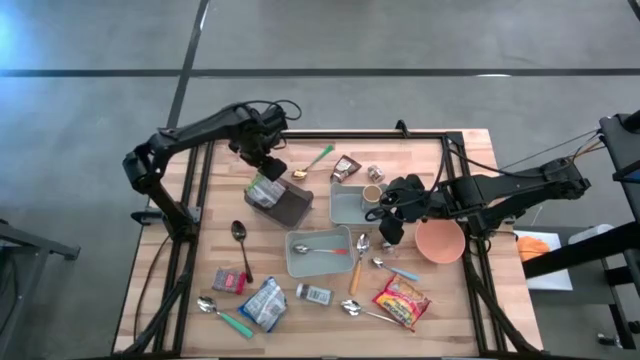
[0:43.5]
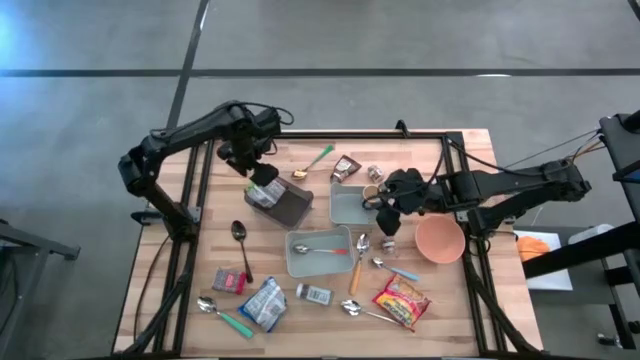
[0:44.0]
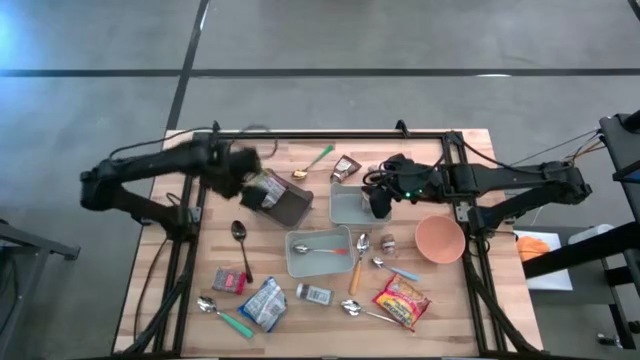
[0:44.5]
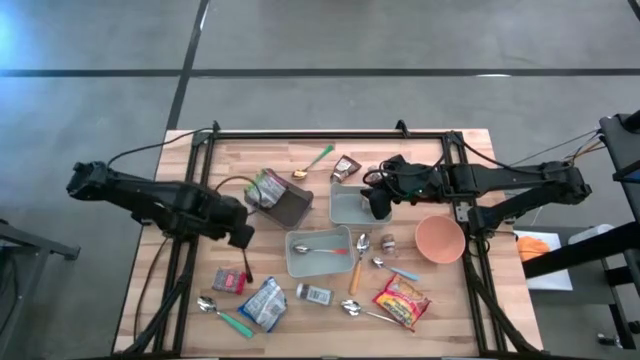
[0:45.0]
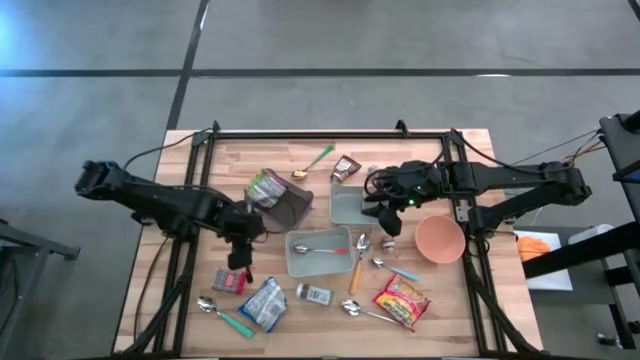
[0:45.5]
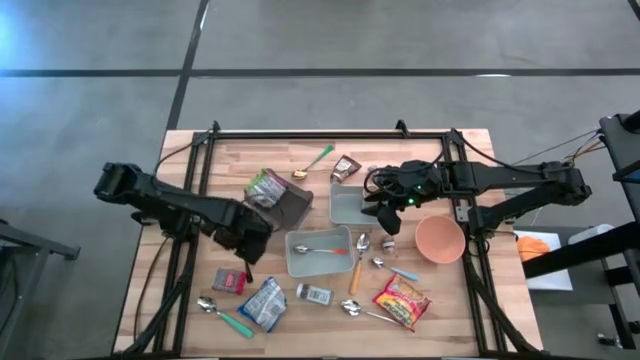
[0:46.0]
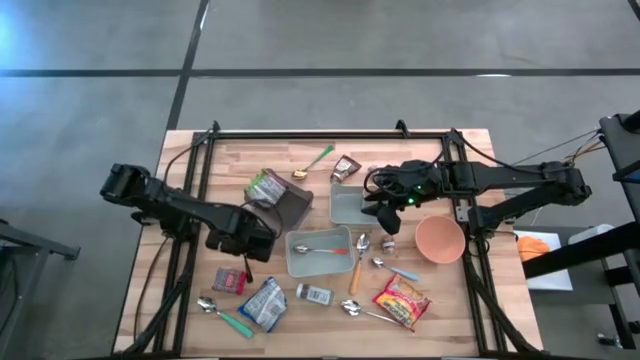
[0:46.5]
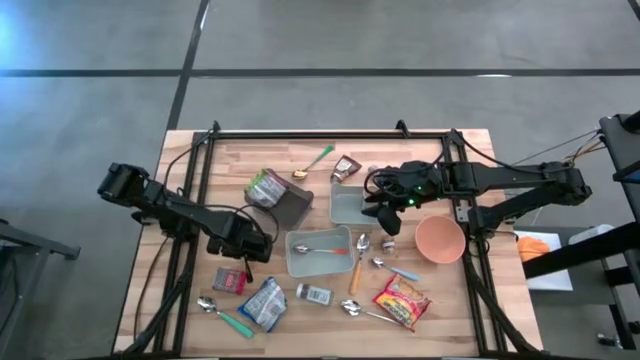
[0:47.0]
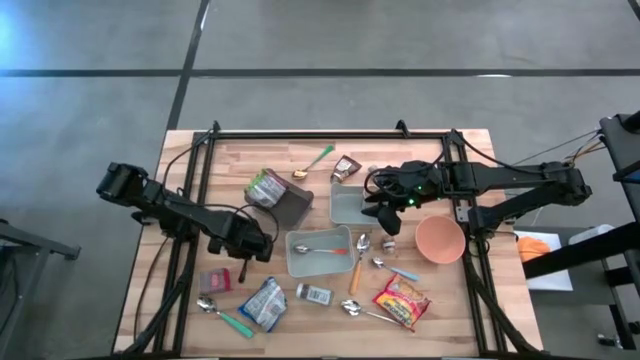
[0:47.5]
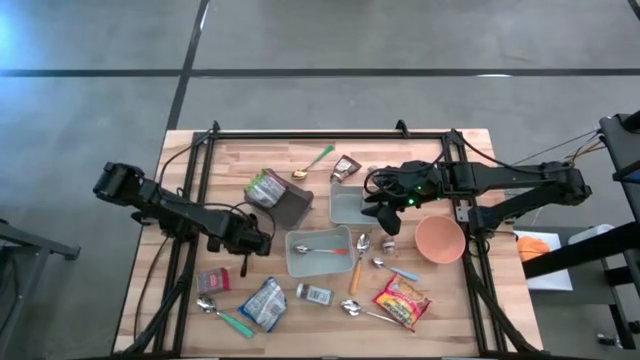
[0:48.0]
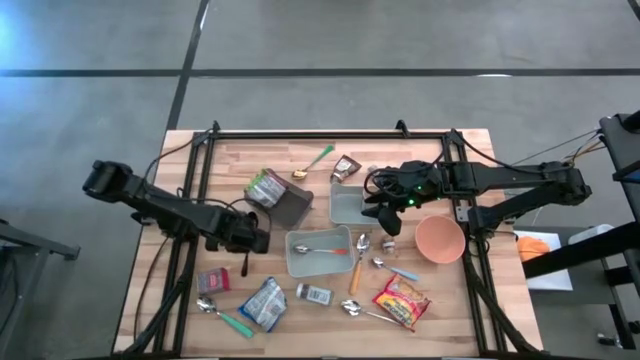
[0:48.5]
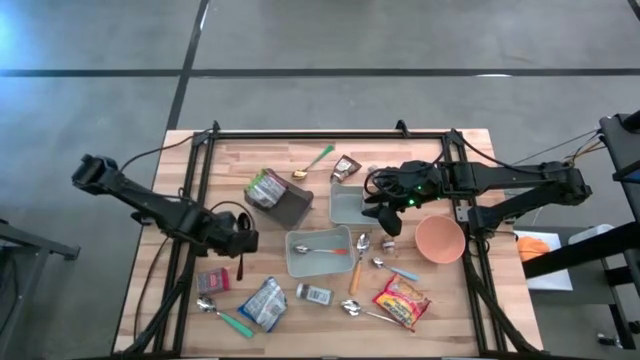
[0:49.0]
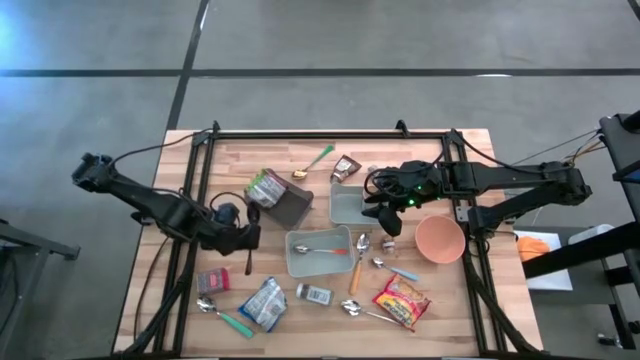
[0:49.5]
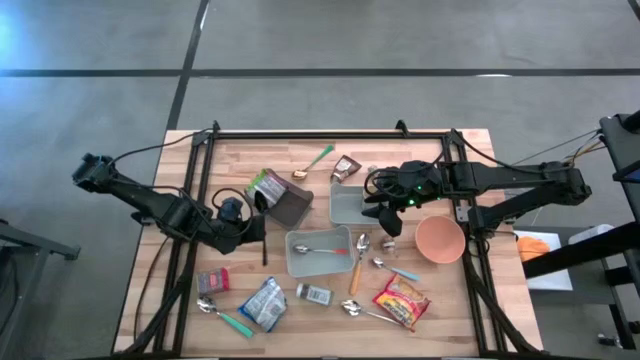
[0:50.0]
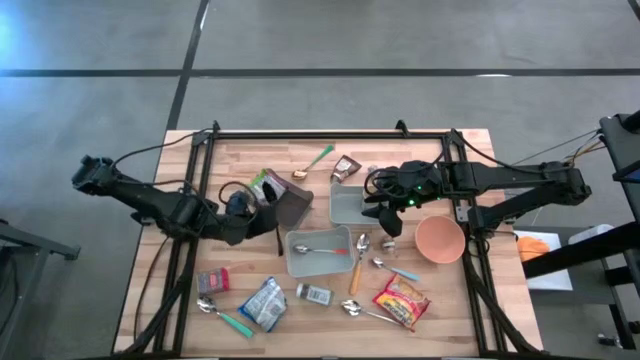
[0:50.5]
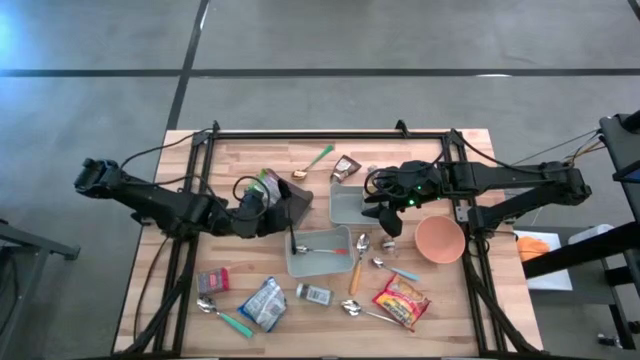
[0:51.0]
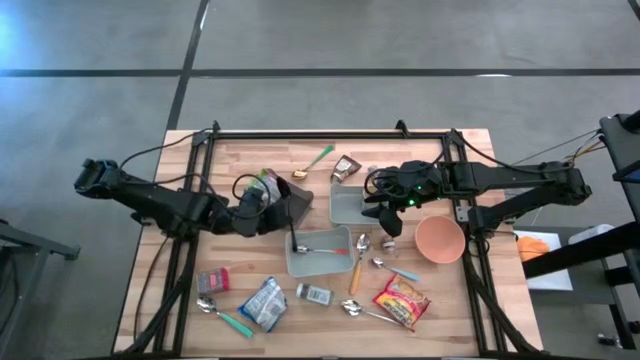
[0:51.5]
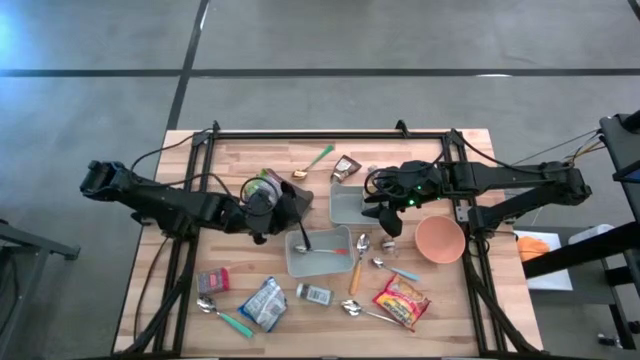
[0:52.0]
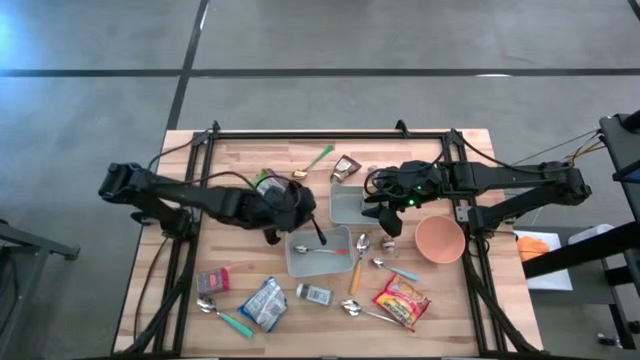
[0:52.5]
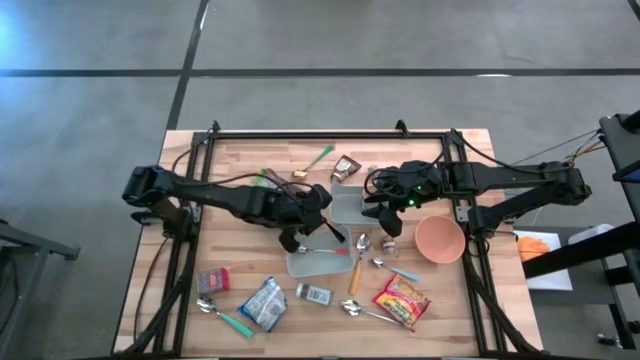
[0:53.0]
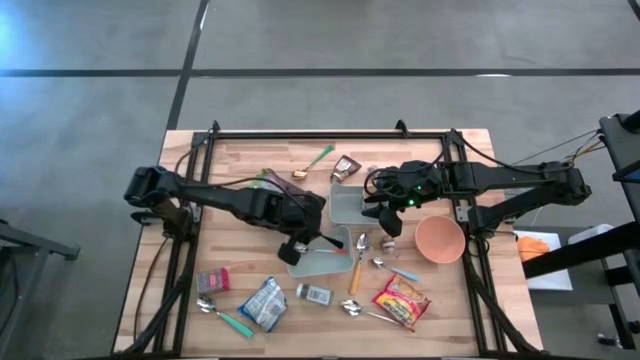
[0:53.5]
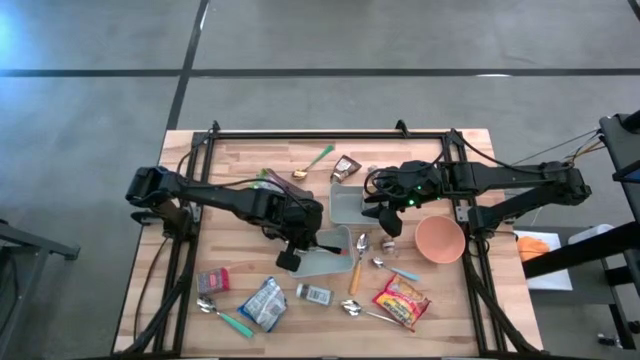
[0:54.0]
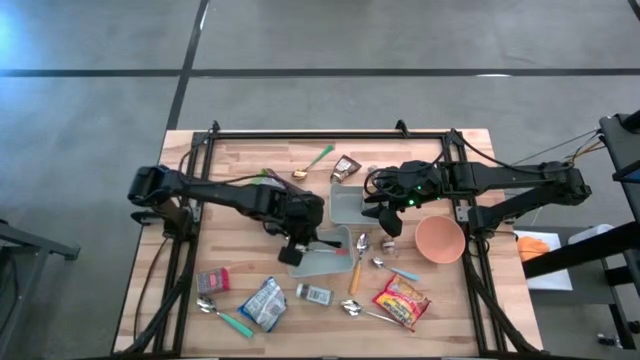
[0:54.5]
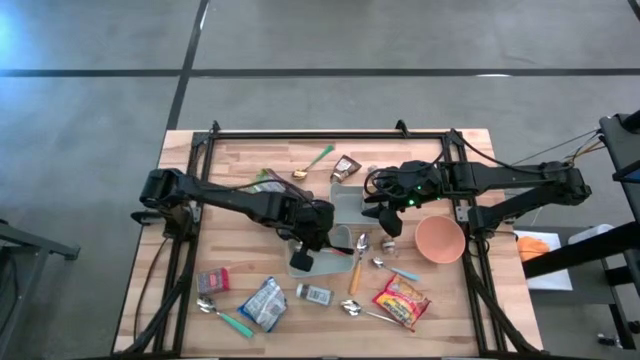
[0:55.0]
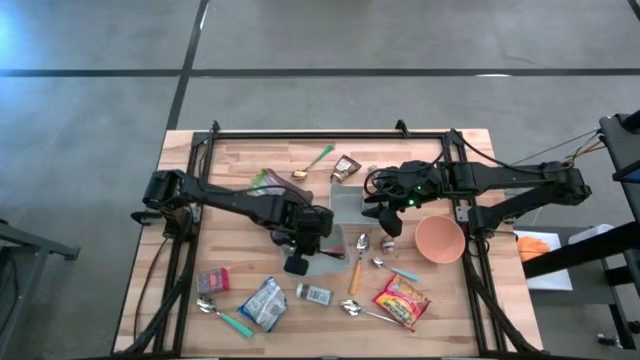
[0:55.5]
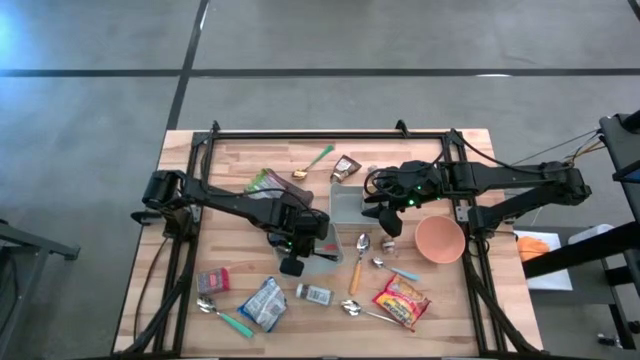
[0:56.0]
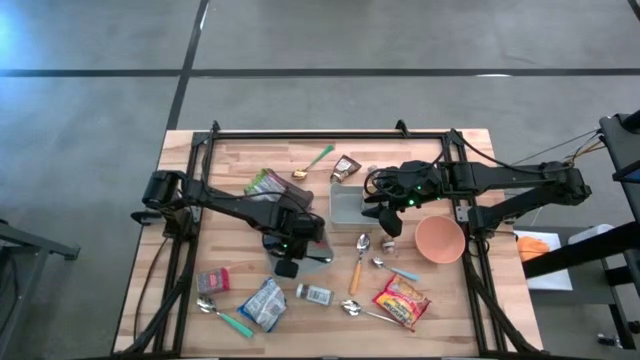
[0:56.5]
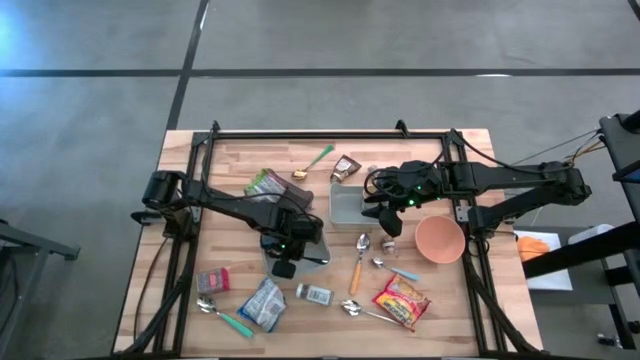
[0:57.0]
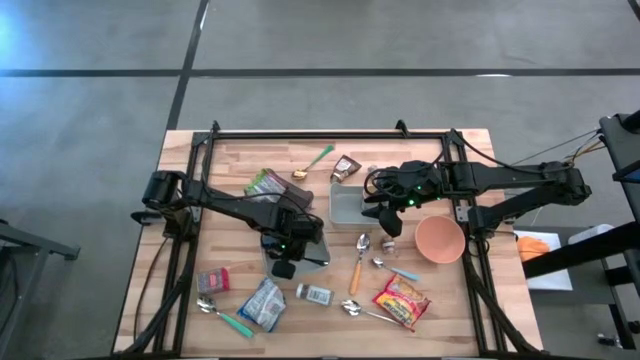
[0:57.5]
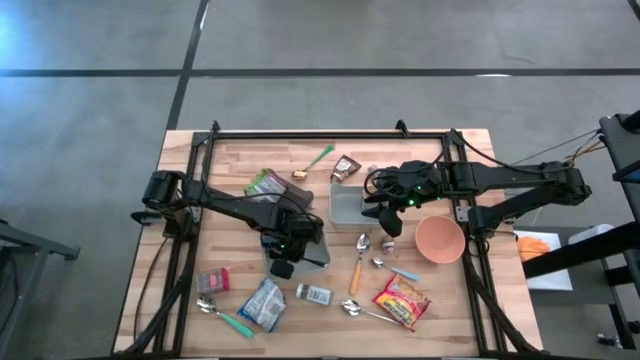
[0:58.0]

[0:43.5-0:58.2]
Put the black spoon into the bottom gray bin

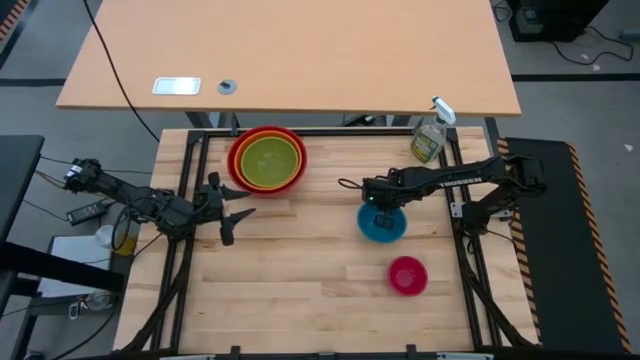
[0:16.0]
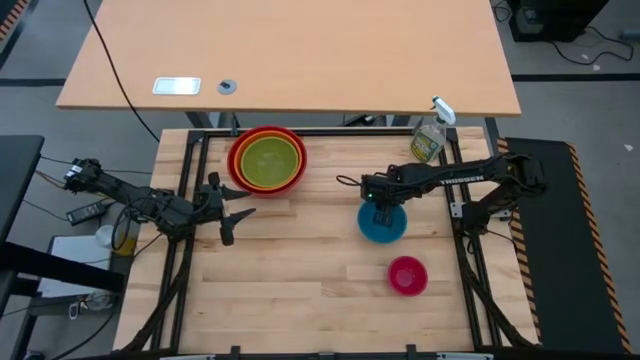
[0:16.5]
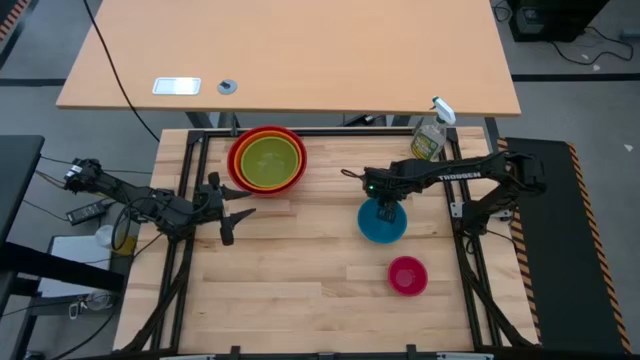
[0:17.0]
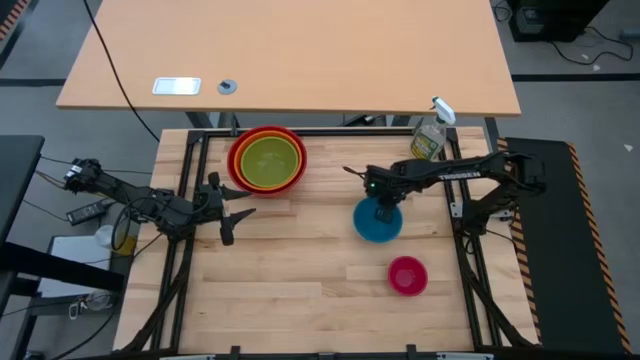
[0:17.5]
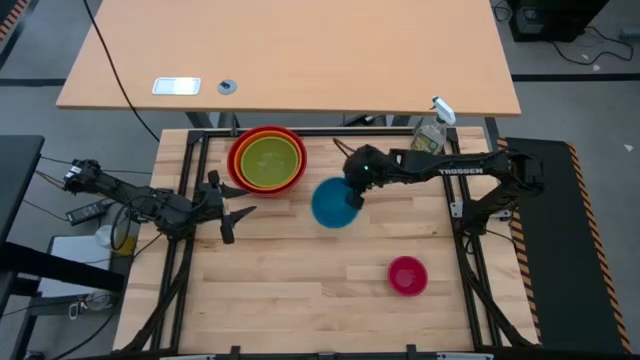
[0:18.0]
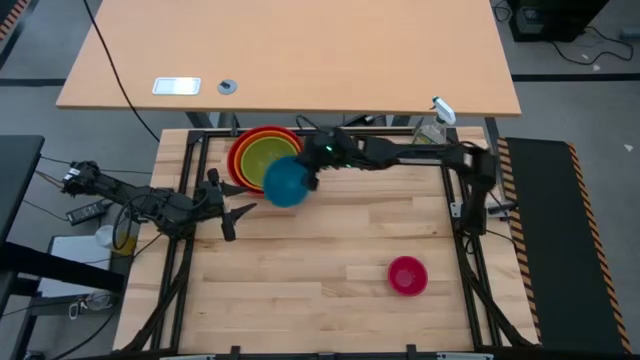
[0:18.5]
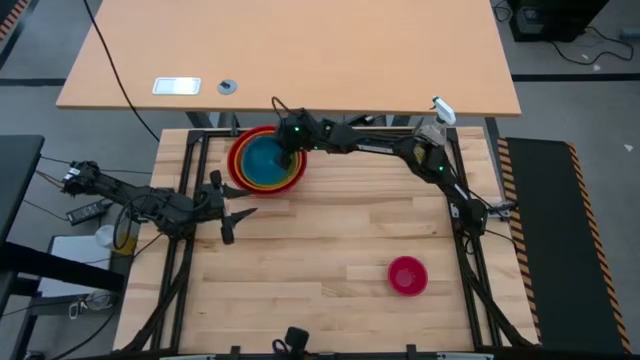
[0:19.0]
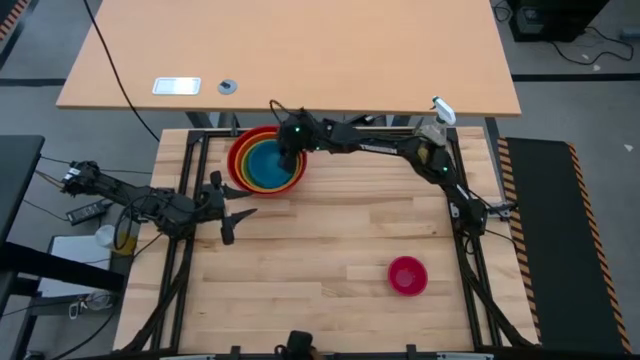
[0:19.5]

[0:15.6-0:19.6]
Stack the small blue bowl on top of the medium green bowl

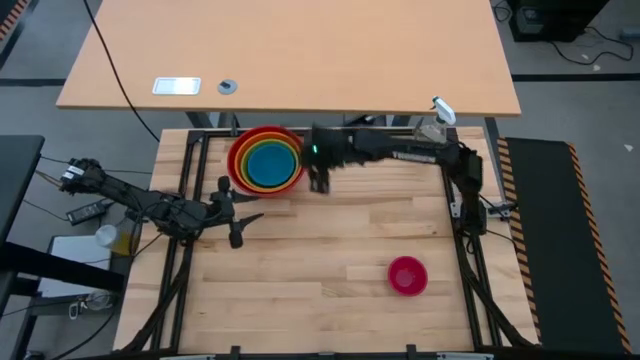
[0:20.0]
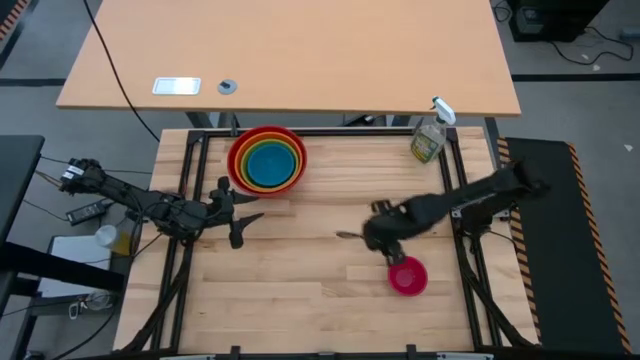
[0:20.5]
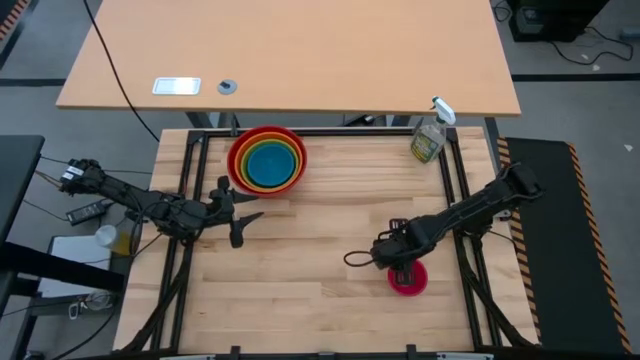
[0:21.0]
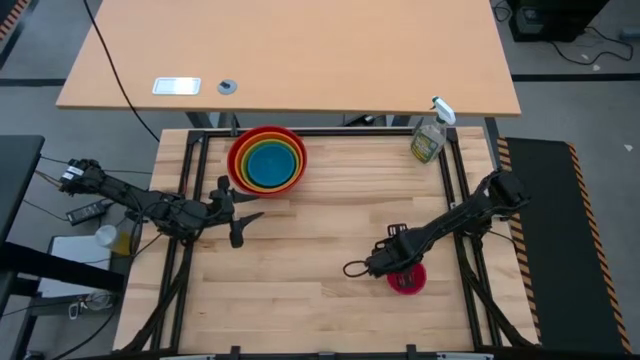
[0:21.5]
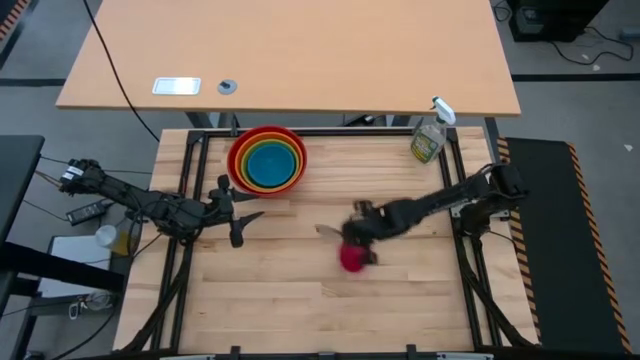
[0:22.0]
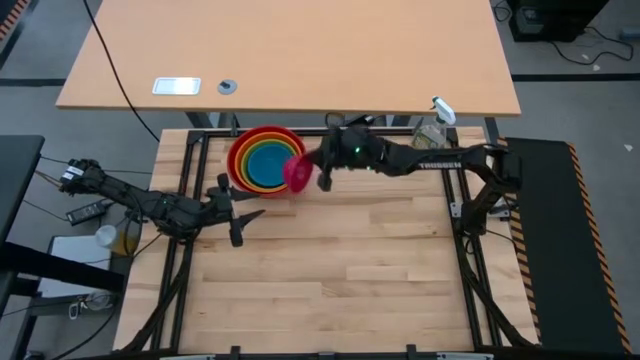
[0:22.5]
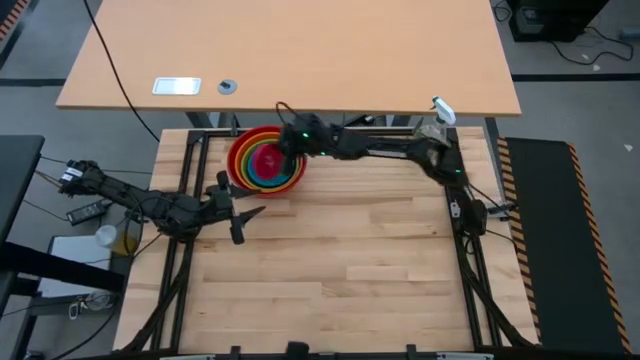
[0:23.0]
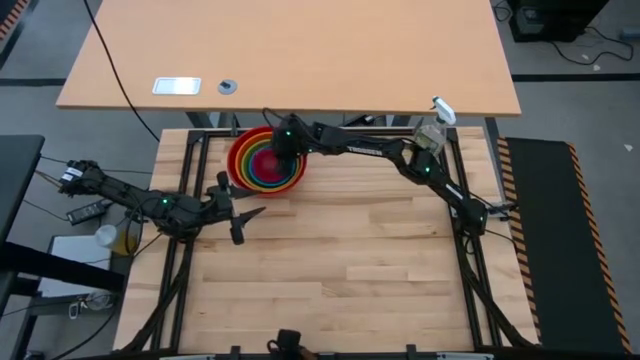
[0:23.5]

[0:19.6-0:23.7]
Stack the extra small pink bowl on top of the small blue bowl
